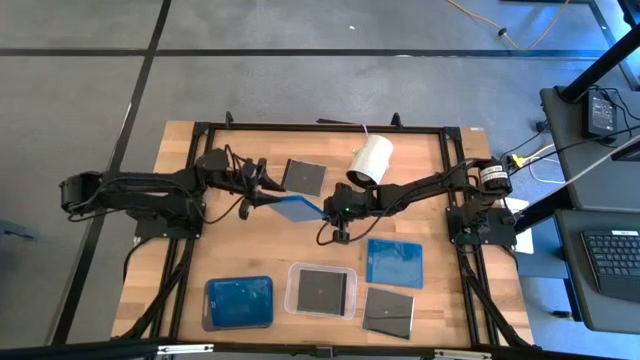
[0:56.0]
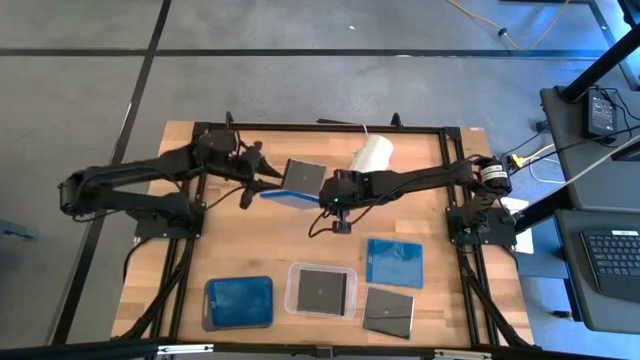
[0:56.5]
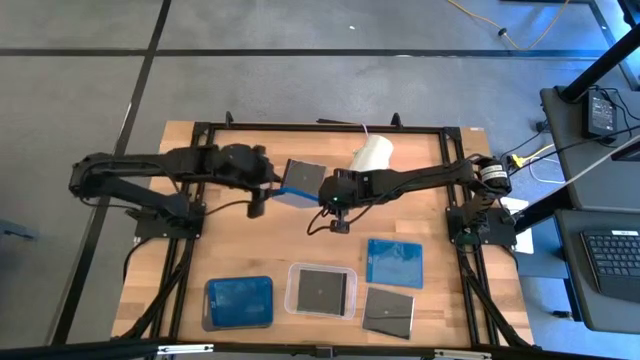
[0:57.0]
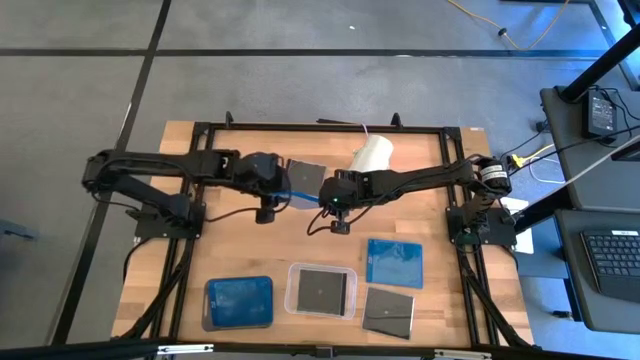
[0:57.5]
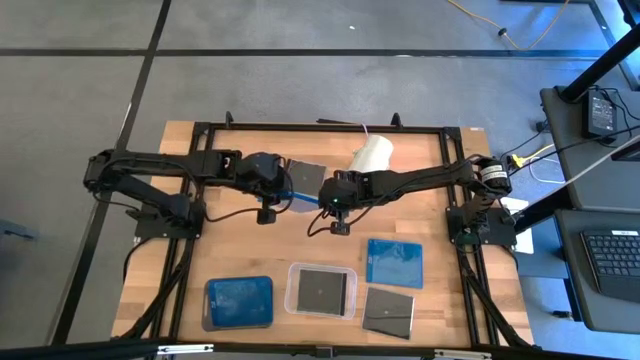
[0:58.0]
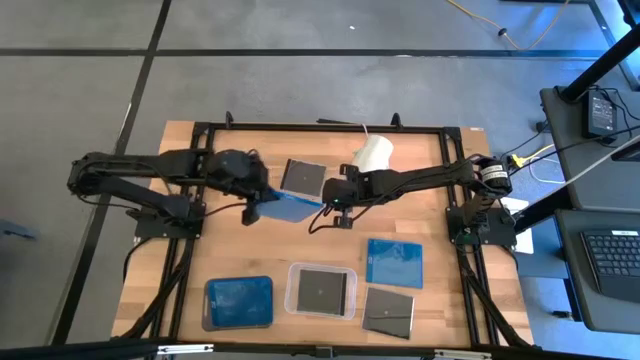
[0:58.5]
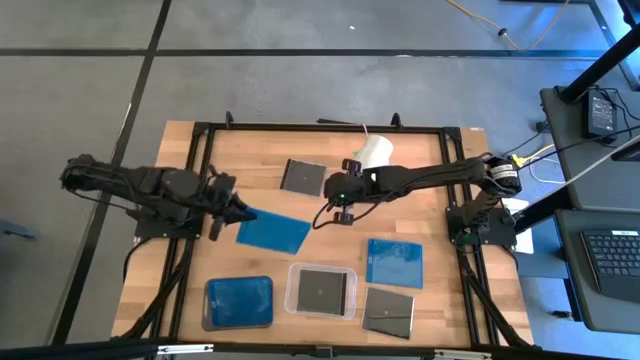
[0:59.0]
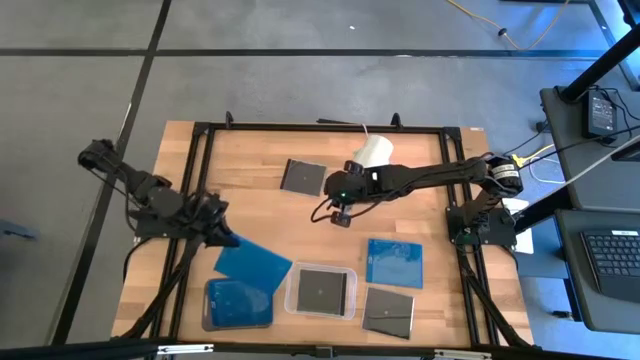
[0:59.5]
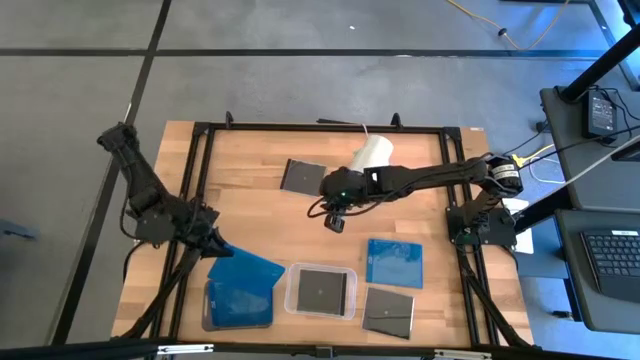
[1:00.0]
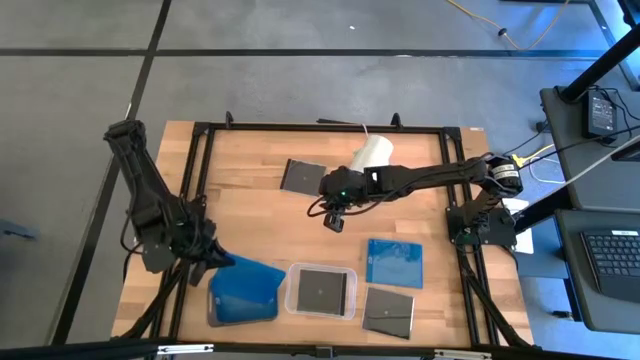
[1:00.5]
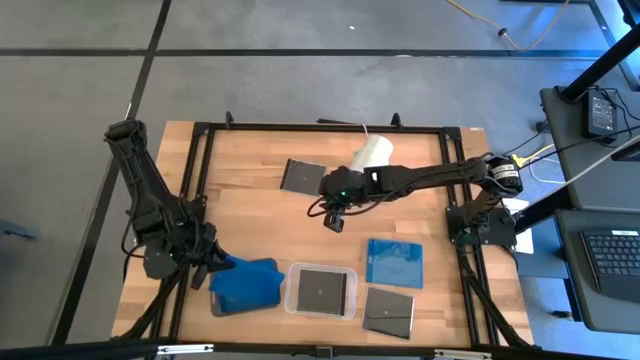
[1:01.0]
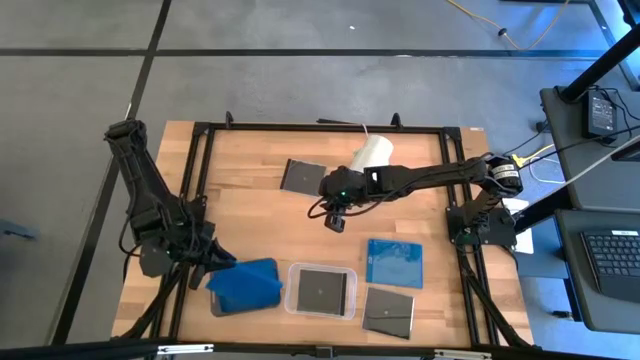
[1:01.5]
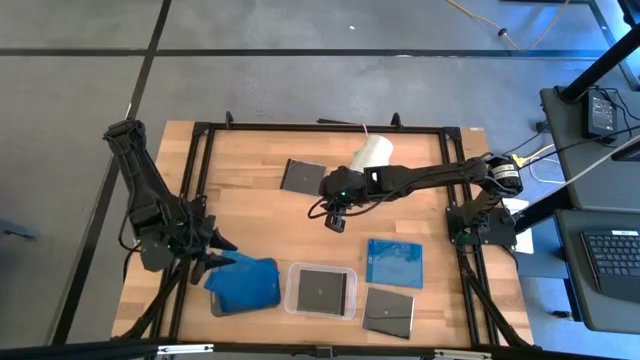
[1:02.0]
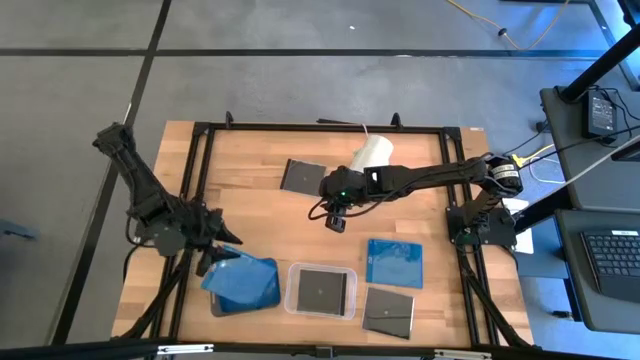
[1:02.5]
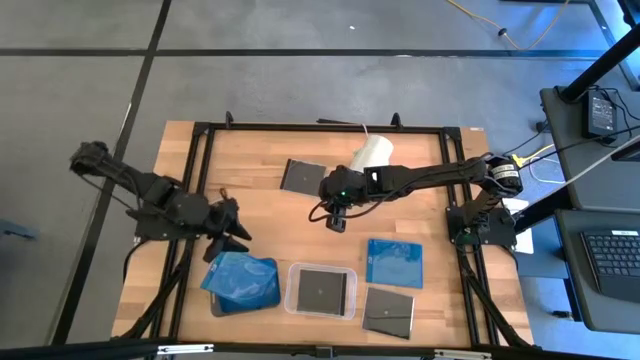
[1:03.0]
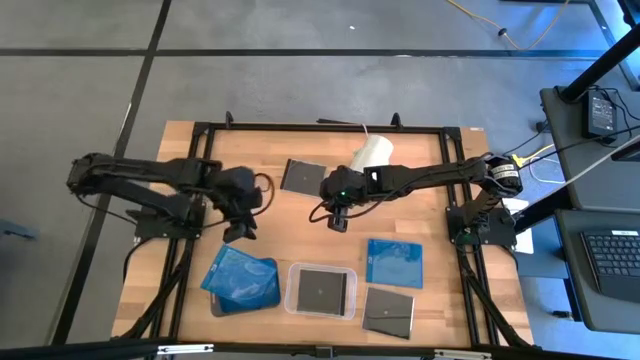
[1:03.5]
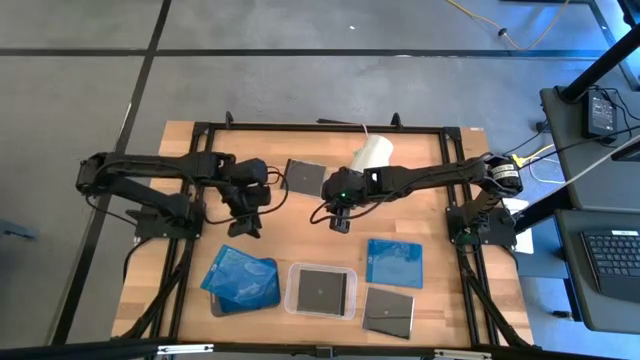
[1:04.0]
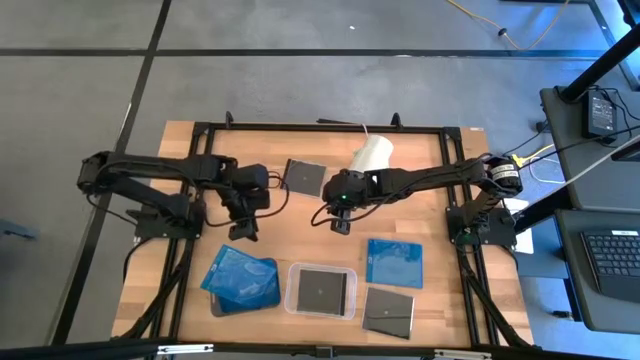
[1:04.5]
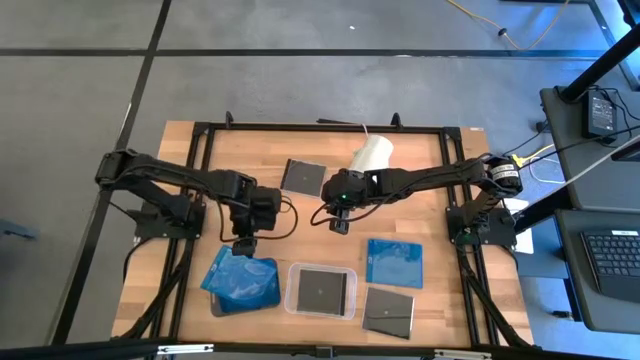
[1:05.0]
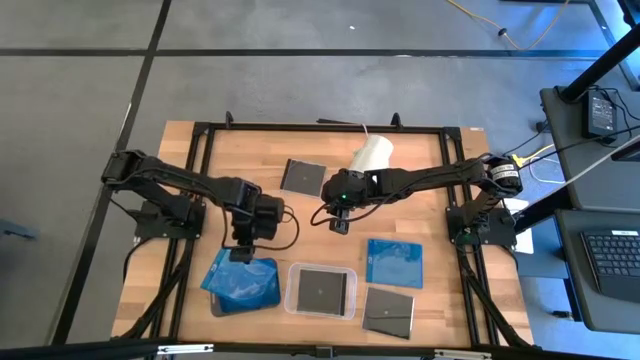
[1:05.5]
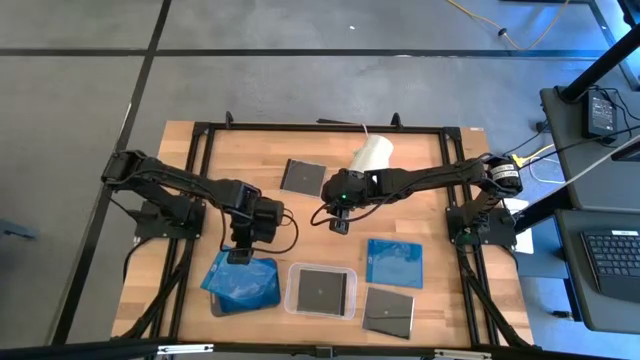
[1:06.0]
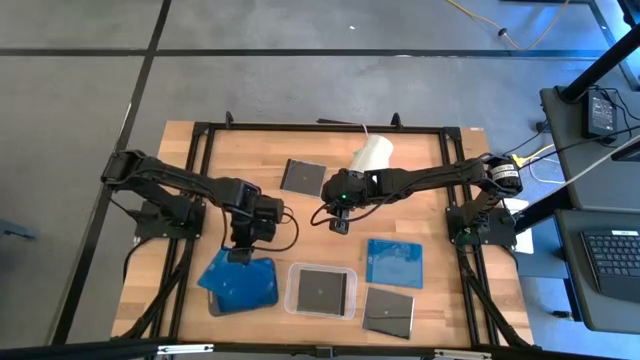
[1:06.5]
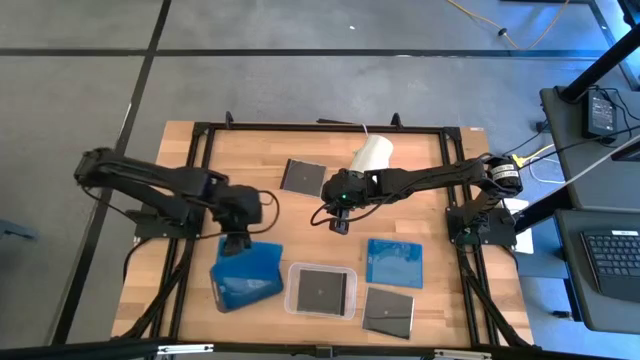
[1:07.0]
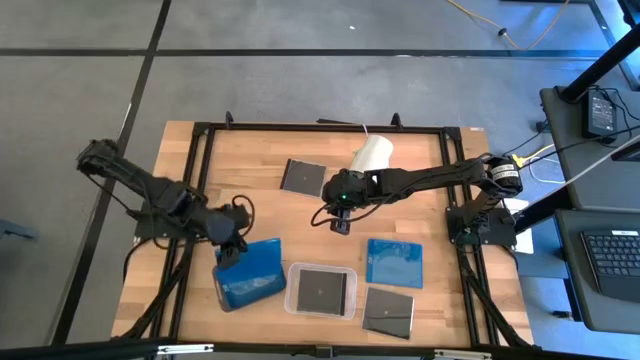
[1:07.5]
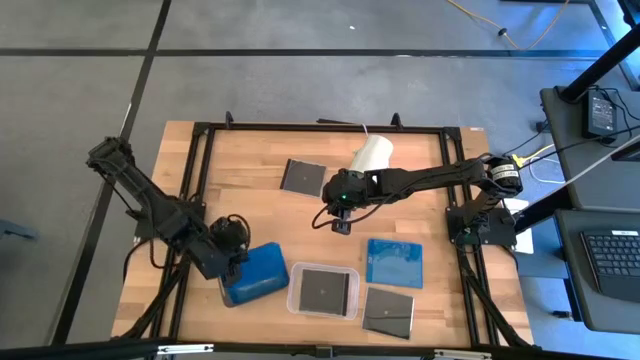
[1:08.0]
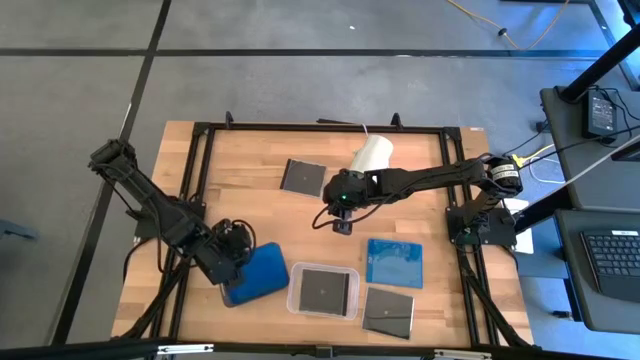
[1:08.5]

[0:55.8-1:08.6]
Task: Pick & place jewel cases by type
Put the left blue CD case into the black bin

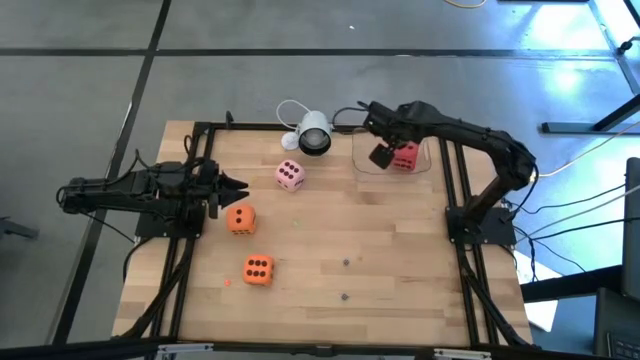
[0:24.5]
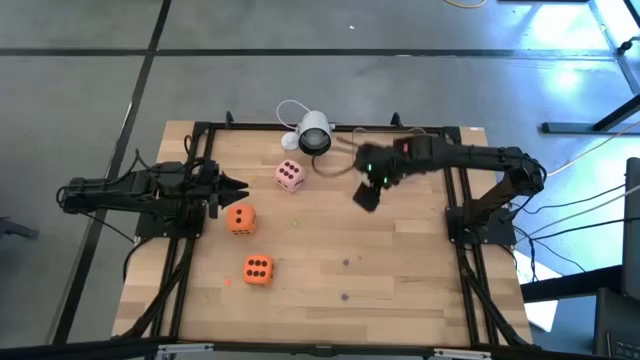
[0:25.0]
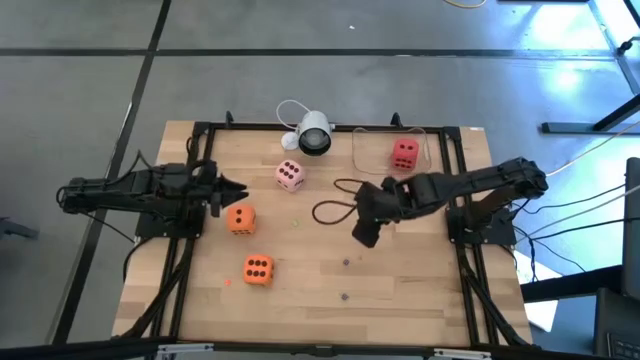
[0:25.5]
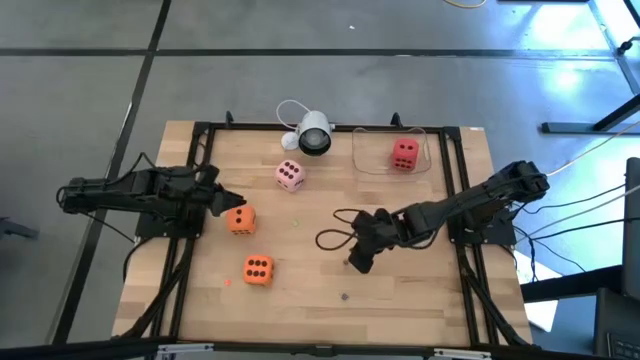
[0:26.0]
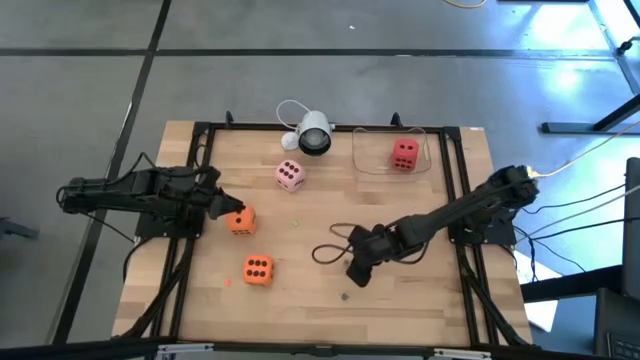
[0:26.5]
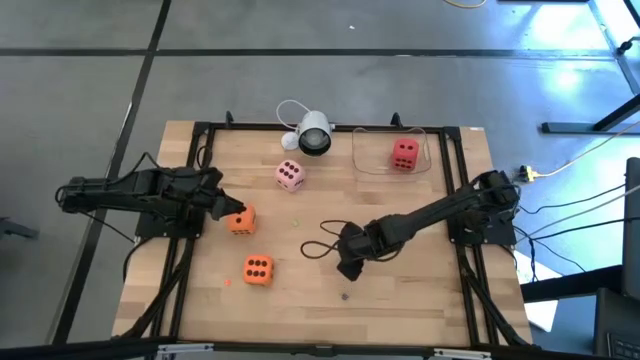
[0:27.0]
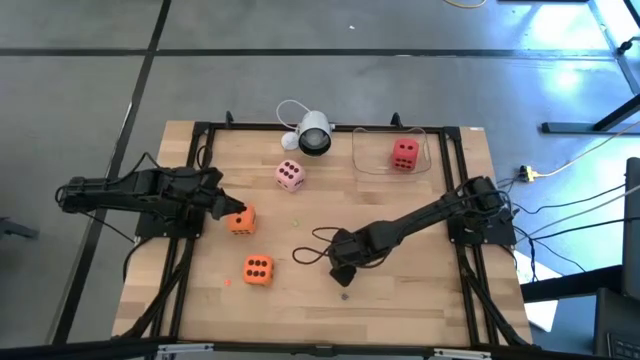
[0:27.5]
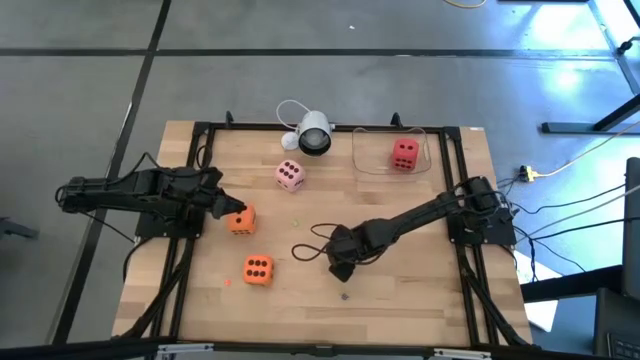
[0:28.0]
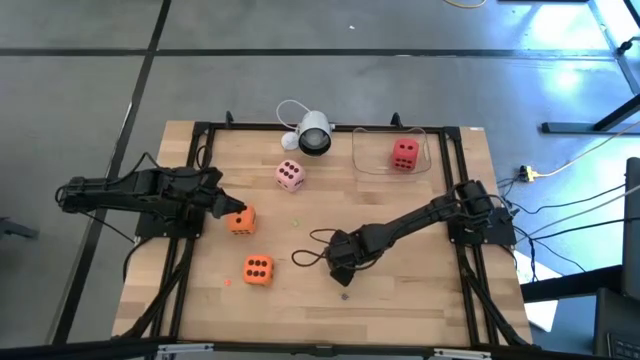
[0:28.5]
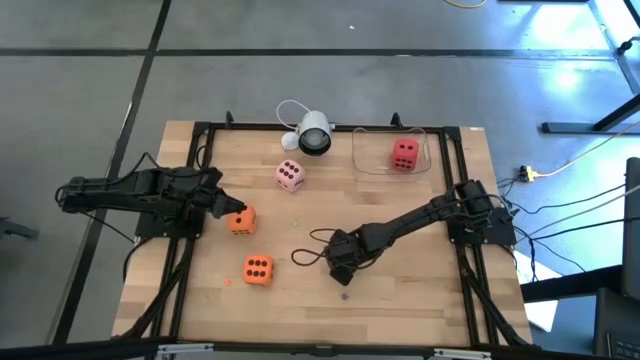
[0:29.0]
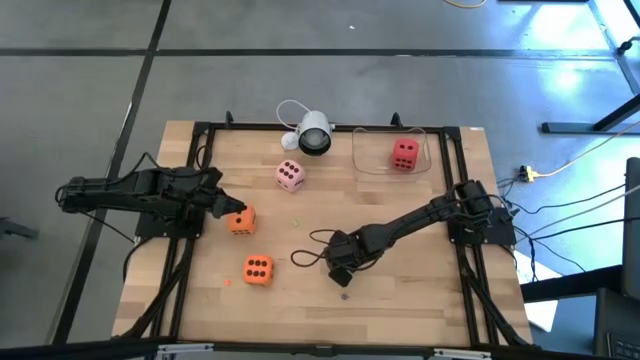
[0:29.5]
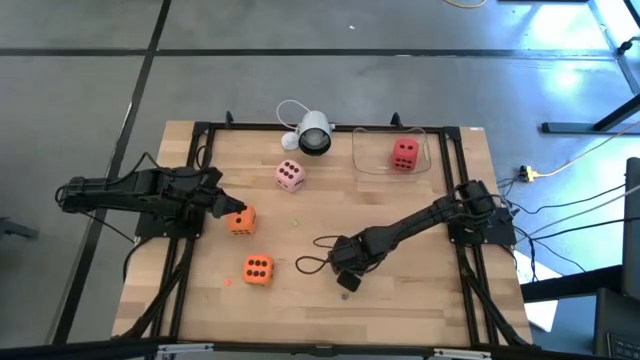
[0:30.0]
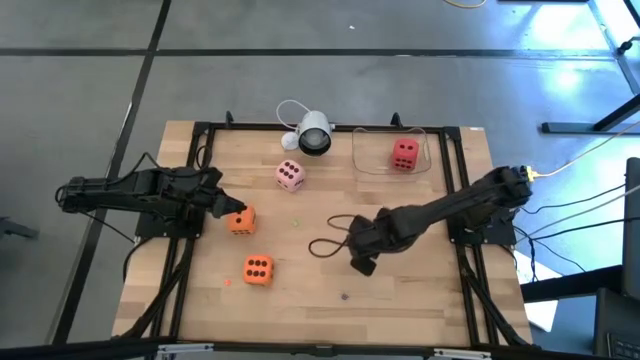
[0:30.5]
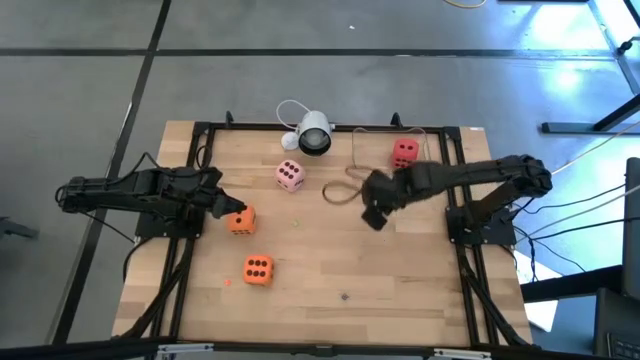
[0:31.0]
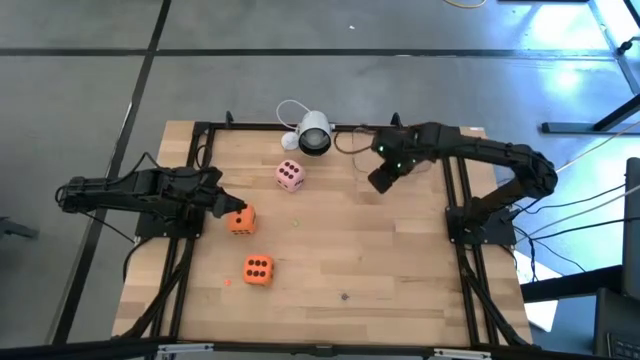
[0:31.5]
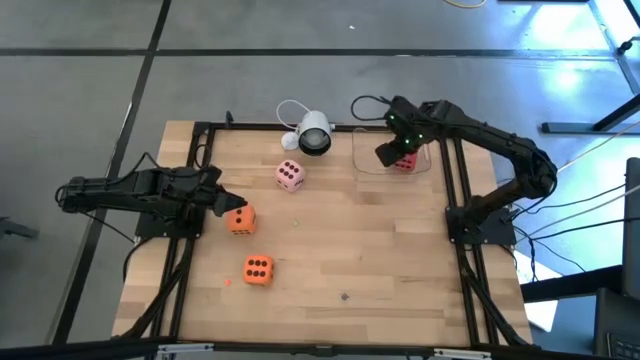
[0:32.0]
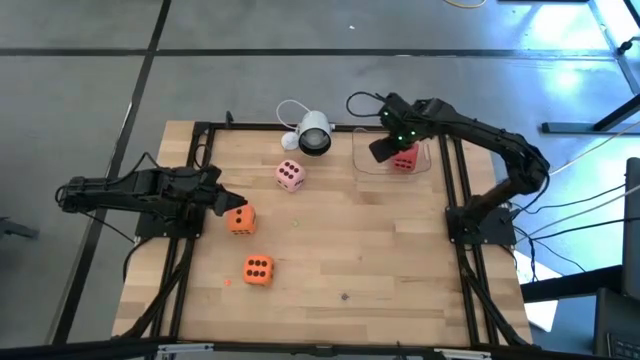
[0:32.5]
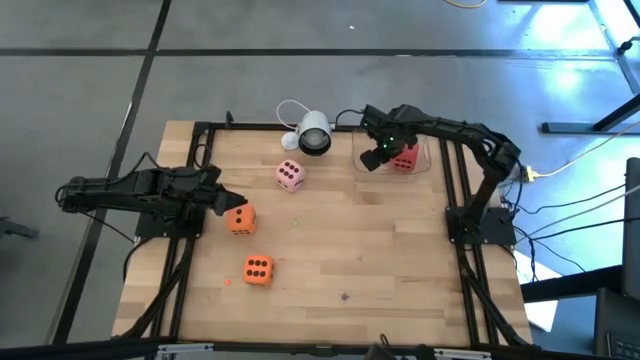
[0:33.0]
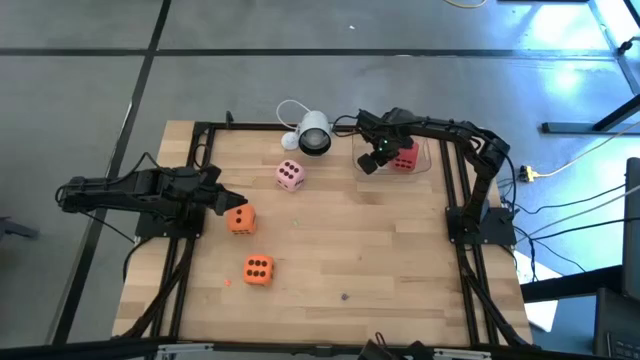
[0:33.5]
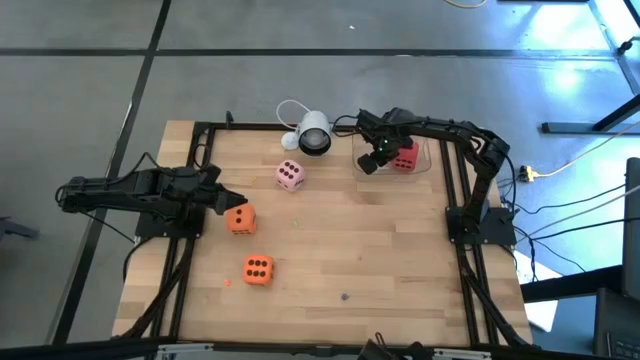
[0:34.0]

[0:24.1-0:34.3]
Task: Pick & Place Dice
Put the top small blue dice into the transparent container
